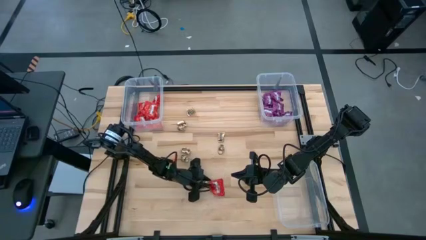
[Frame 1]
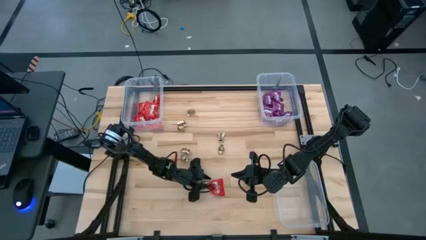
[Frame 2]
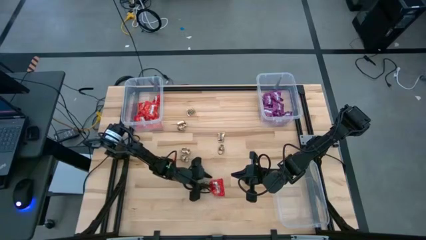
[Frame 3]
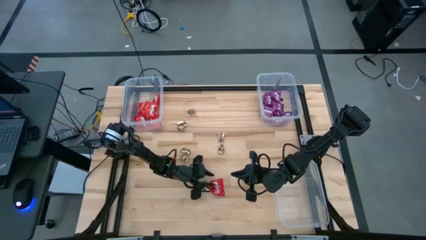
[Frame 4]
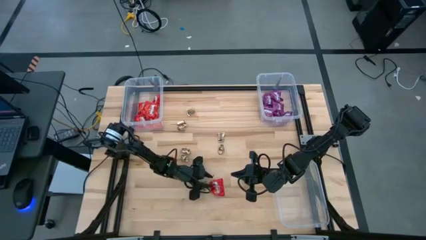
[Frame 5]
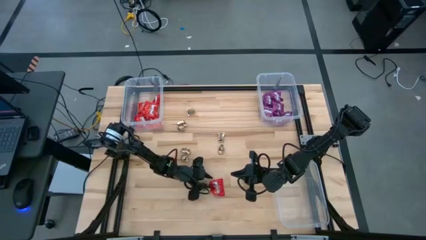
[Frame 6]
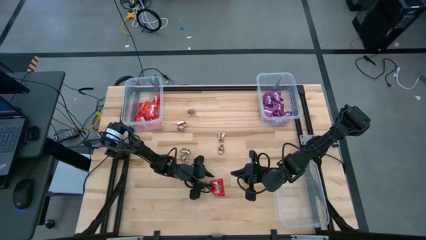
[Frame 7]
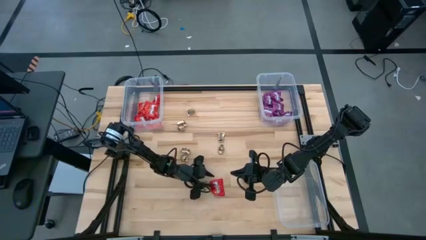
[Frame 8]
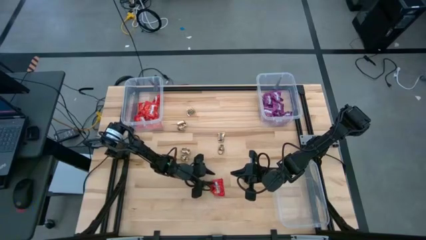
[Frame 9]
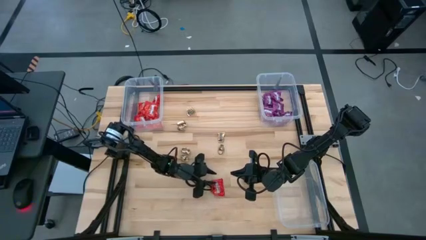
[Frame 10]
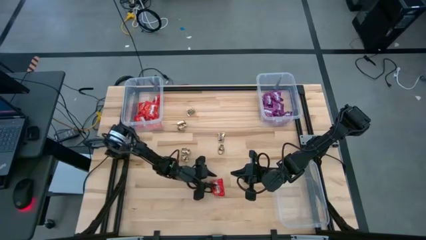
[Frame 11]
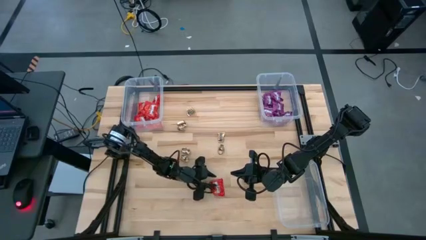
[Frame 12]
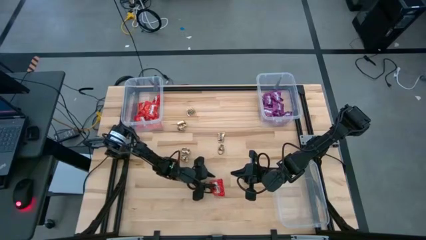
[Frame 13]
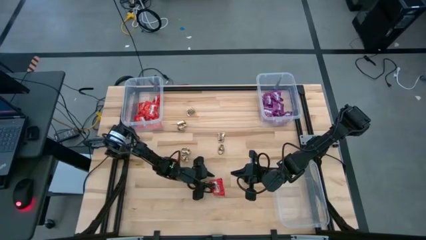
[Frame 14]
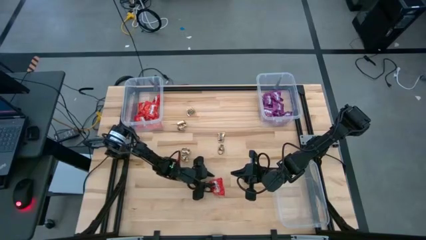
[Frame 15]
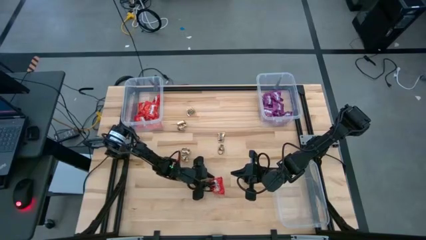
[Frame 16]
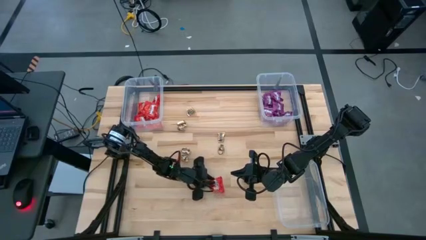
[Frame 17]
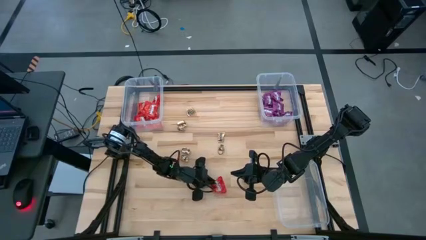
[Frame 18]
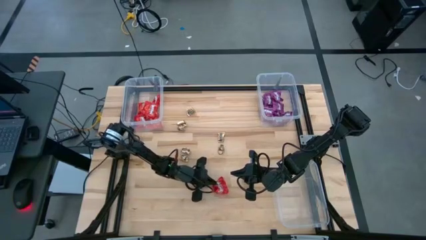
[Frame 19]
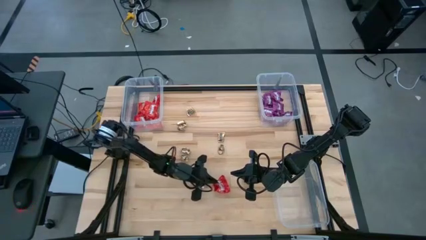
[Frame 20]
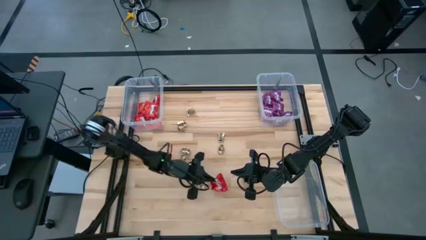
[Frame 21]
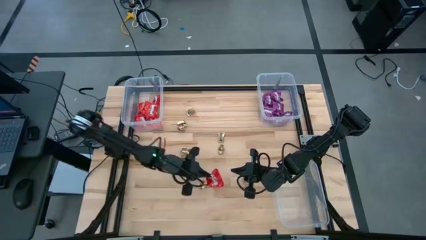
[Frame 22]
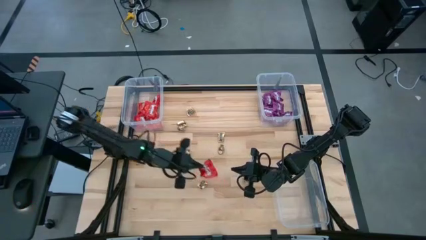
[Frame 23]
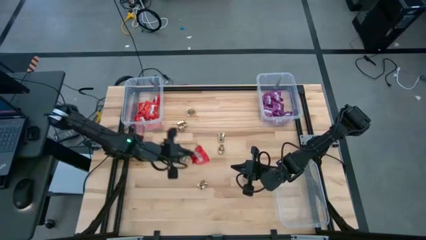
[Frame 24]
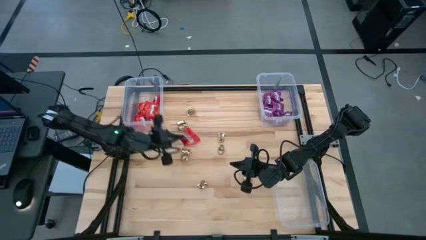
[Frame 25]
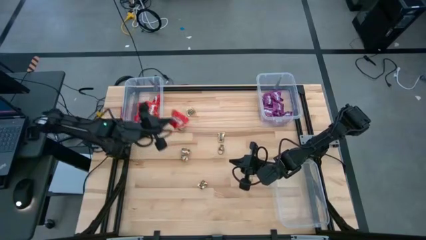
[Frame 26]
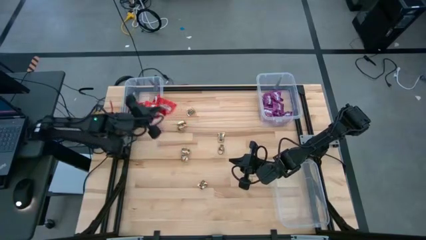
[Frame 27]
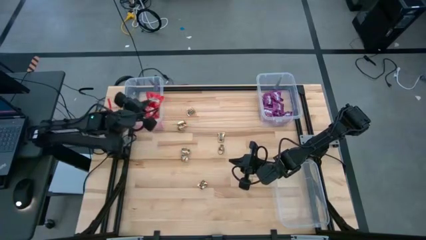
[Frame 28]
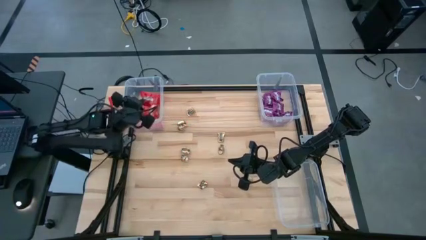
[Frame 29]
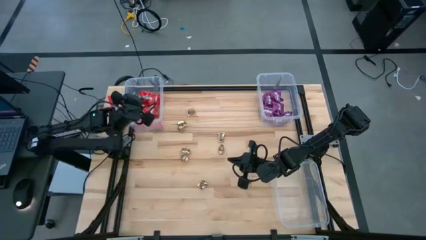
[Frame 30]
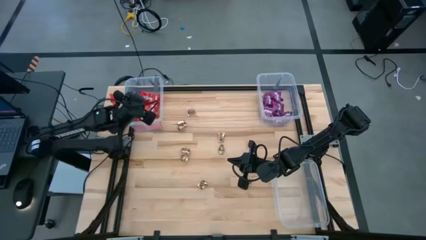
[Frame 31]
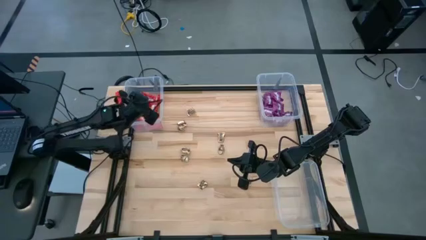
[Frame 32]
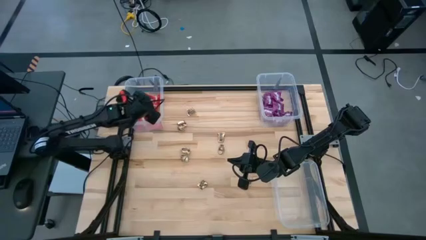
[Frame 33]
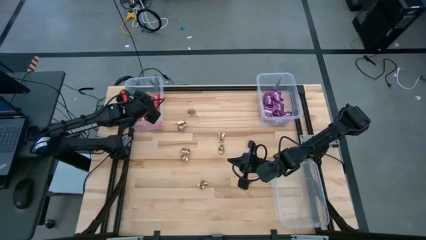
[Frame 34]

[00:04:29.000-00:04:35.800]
Task: Sort candy
Put the red candy into the top left transparent bin

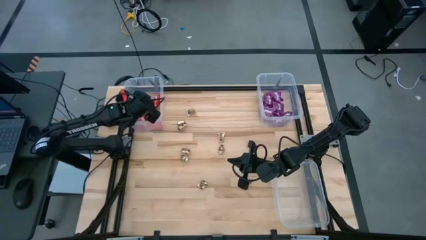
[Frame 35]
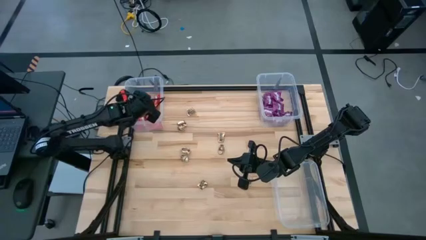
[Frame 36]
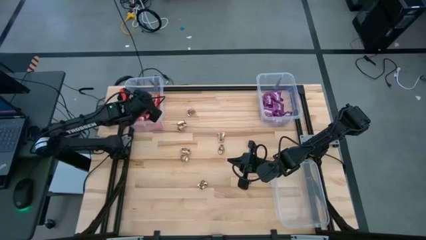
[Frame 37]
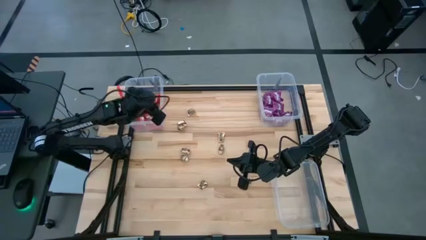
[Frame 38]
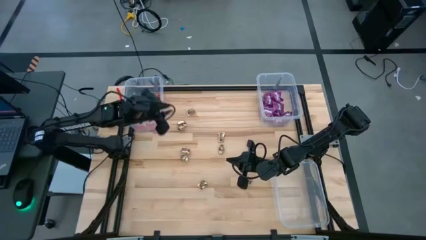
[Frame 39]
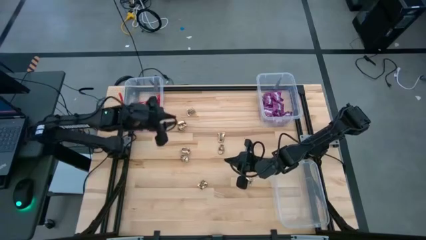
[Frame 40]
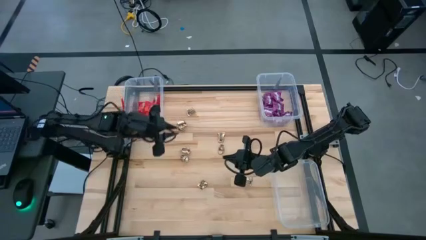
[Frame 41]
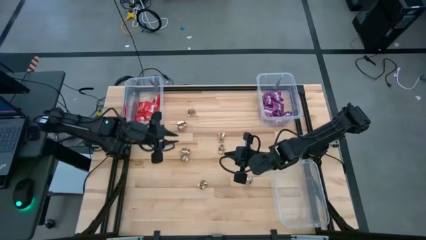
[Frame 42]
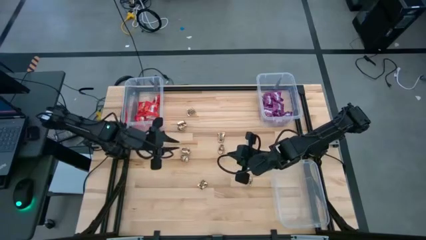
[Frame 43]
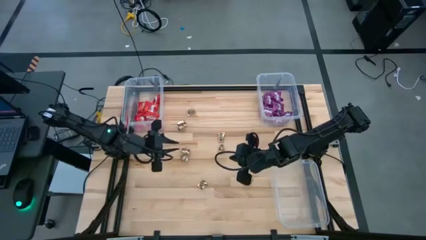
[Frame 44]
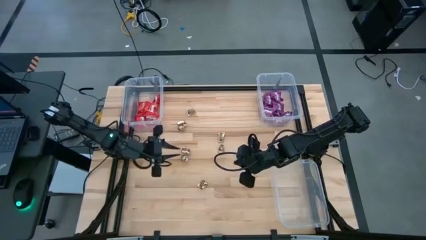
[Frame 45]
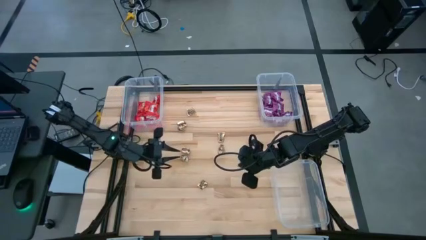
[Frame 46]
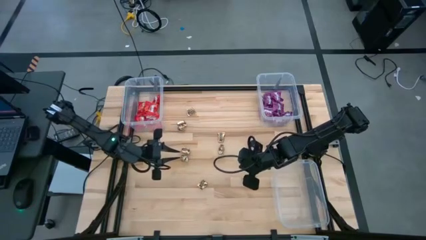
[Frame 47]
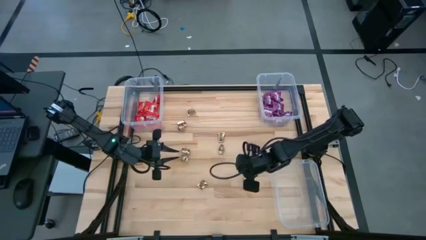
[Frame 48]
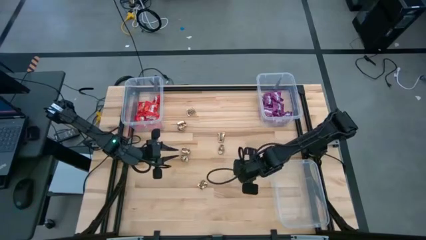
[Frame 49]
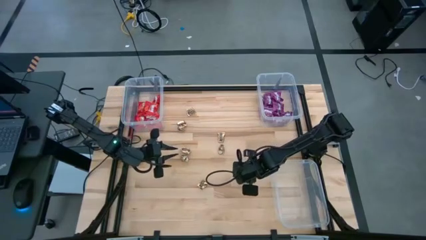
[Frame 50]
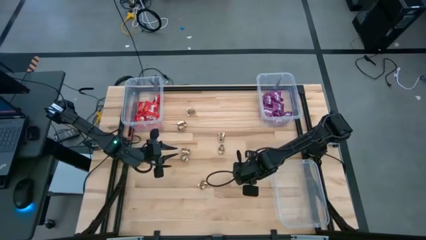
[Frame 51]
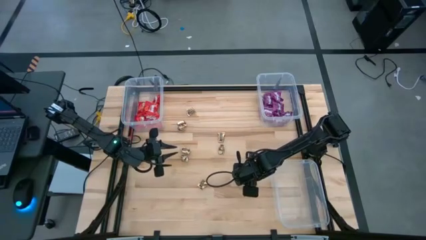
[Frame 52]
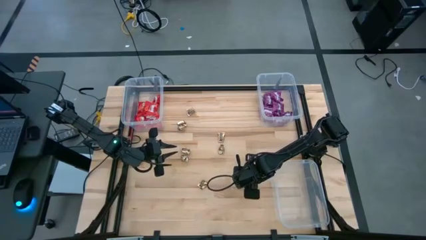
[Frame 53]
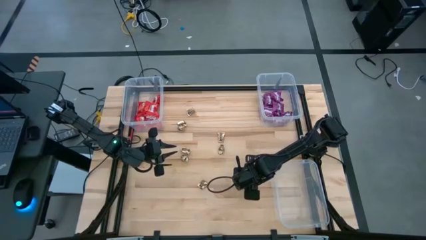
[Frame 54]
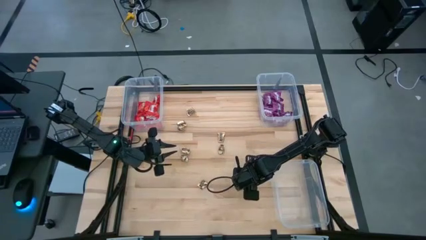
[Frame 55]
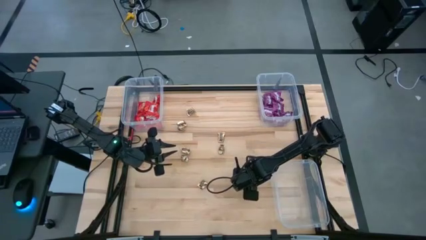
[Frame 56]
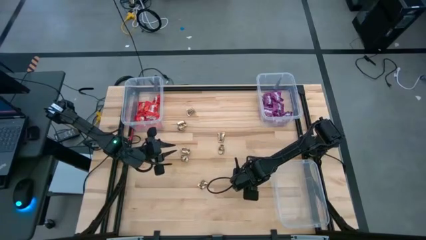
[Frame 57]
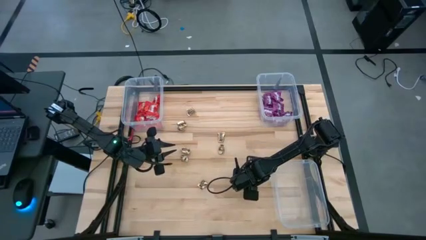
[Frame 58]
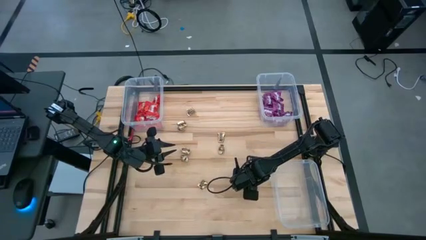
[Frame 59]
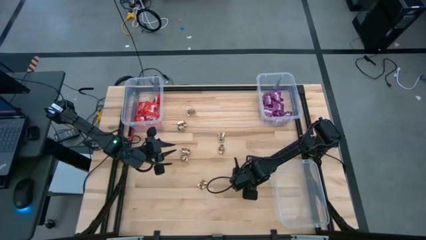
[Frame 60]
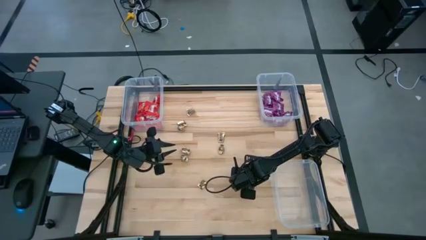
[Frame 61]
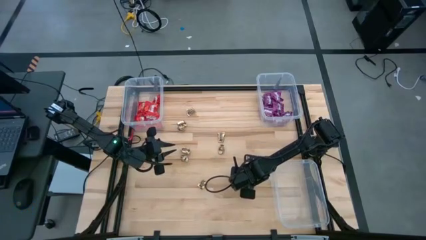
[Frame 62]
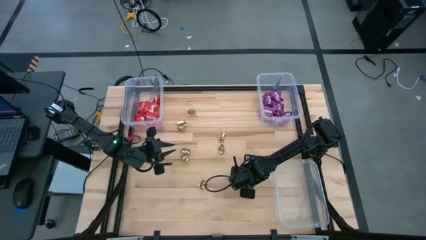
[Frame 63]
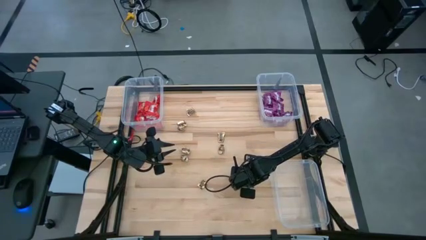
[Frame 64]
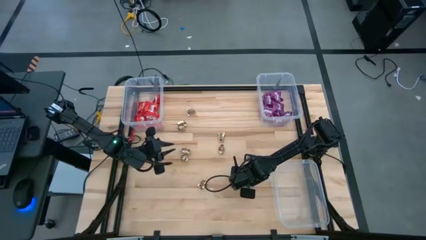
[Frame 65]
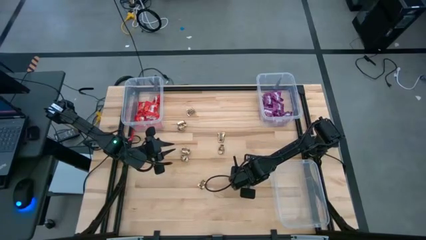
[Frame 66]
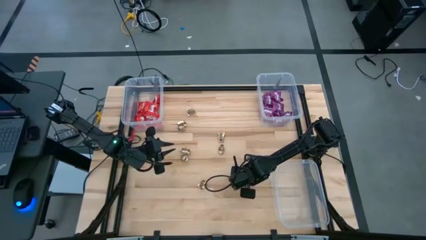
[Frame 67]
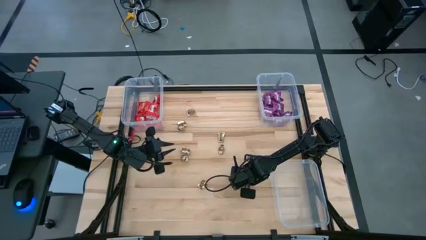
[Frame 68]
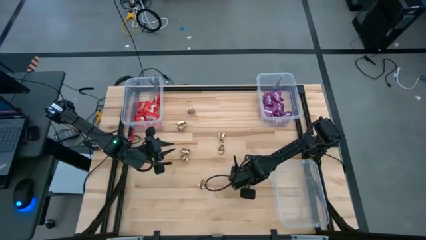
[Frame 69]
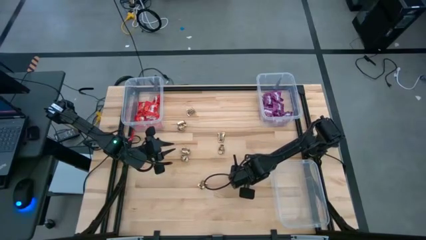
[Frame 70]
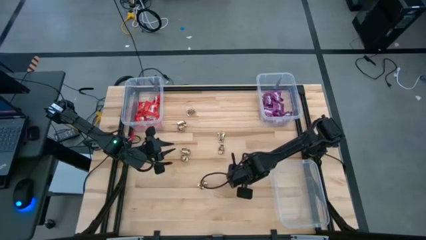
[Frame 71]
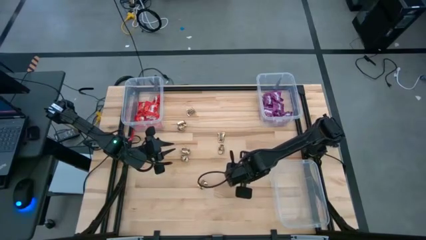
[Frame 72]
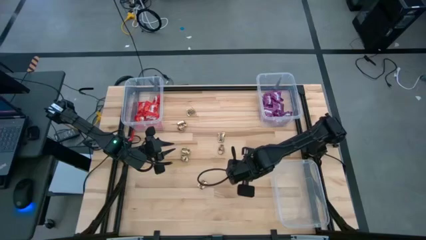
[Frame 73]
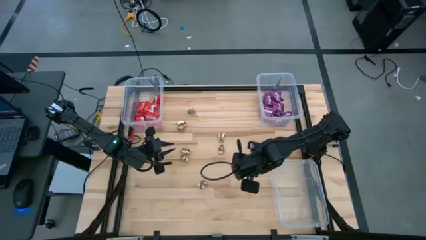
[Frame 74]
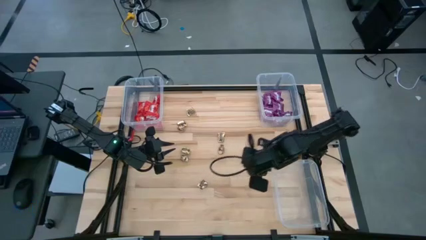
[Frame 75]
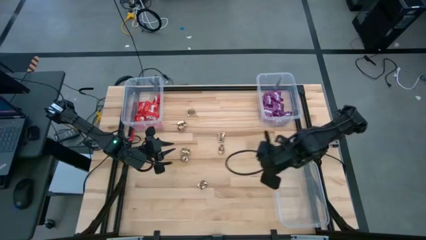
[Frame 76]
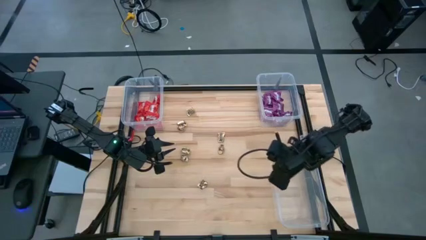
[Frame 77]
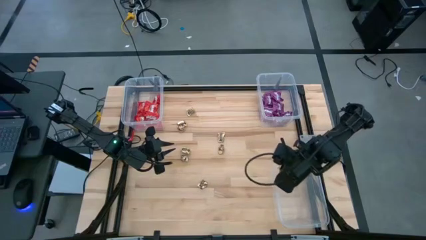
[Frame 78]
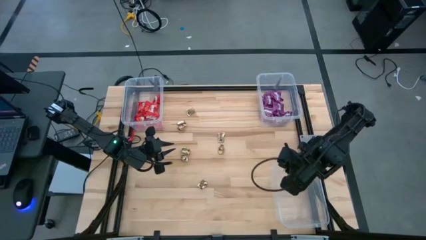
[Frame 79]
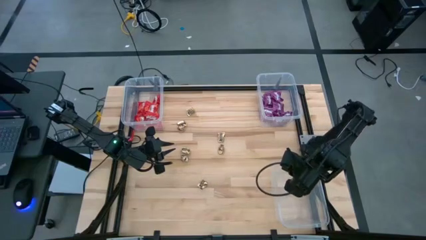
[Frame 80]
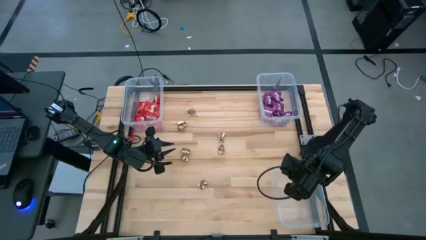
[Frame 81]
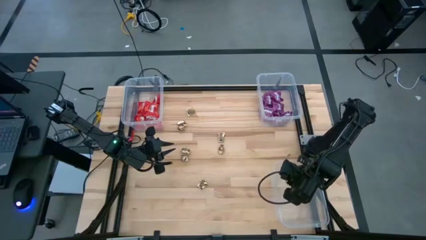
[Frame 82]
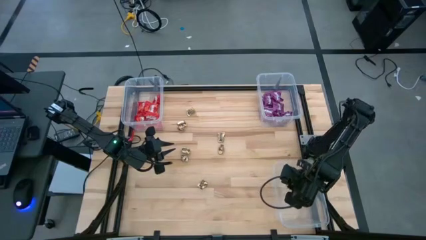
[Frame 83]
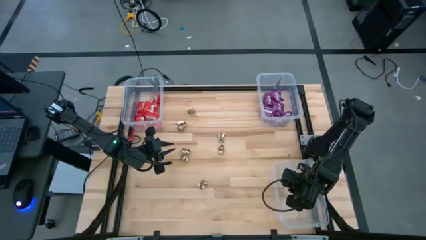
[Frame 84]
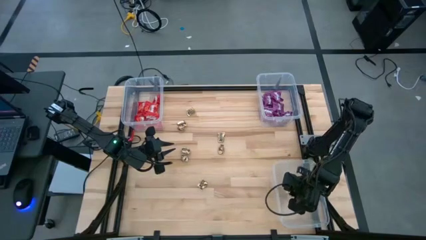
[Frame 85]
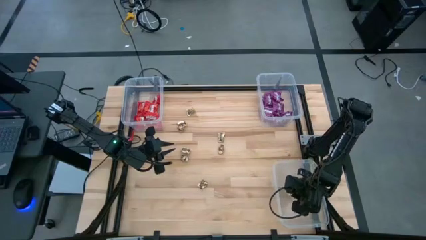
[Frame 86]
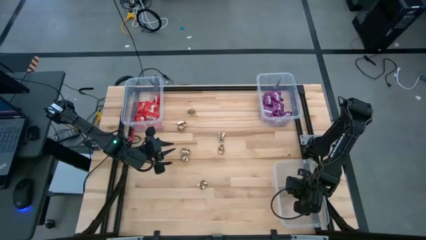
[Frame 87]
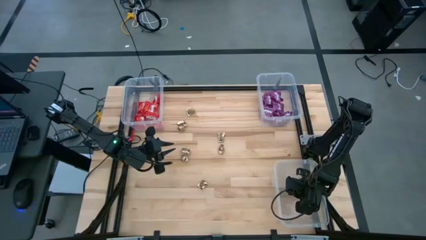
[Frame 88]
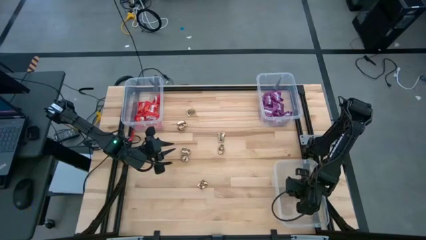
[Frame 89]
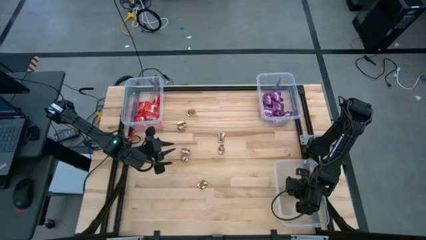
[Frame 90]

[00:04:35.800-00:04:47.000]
Put the yellow candy into the top left transparent bin
